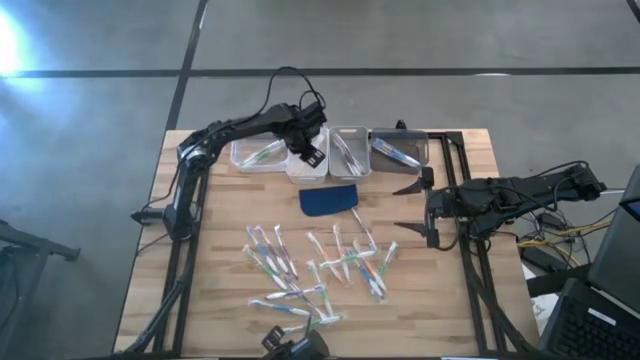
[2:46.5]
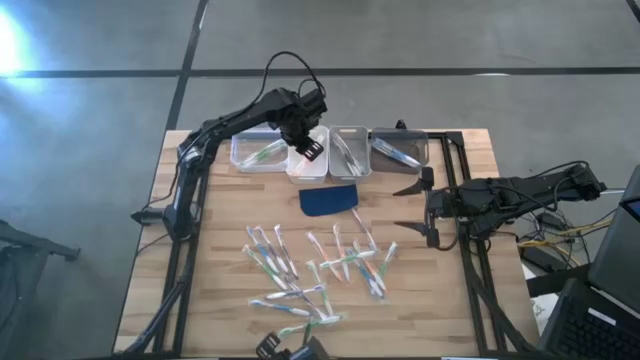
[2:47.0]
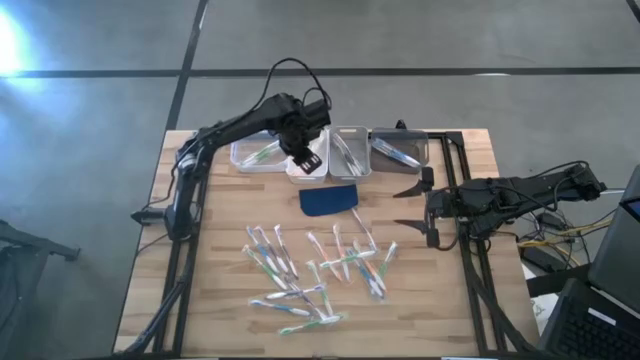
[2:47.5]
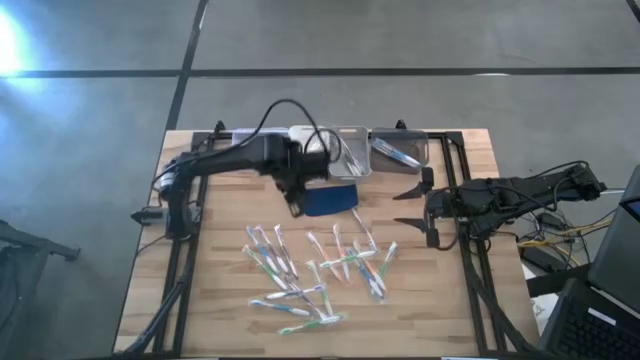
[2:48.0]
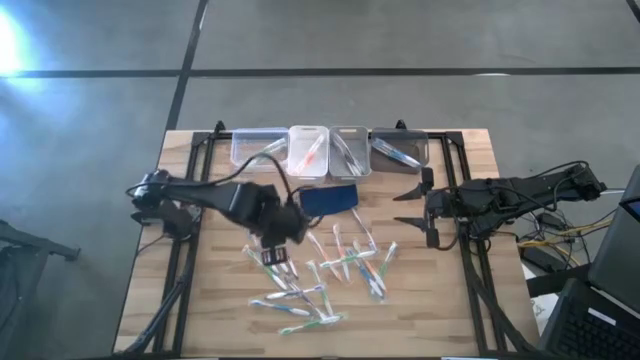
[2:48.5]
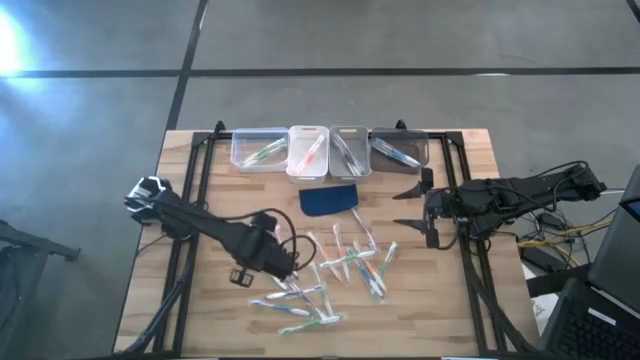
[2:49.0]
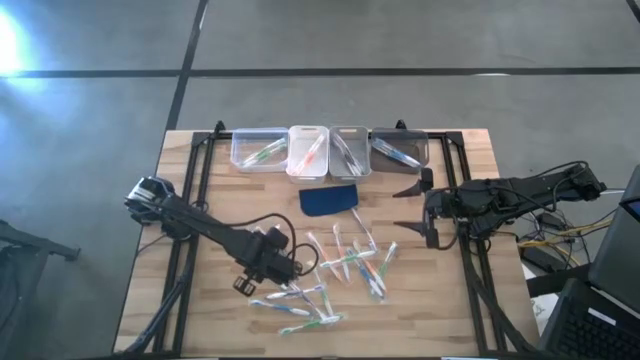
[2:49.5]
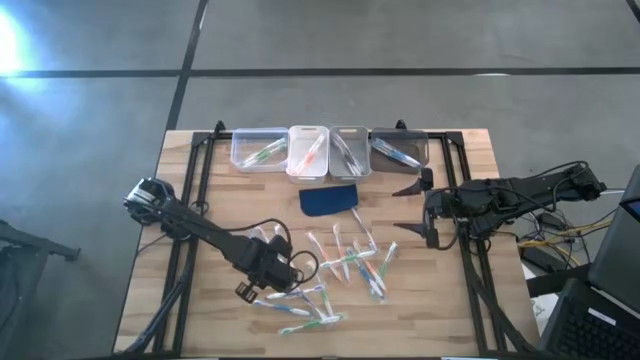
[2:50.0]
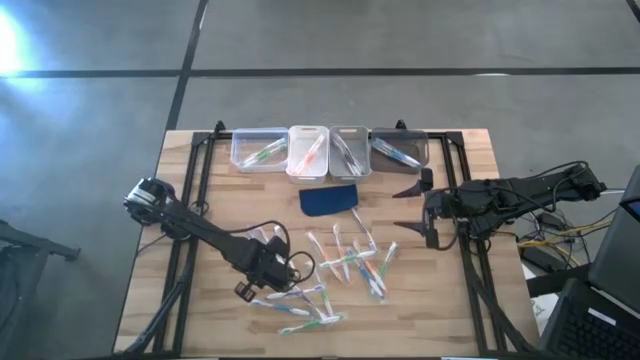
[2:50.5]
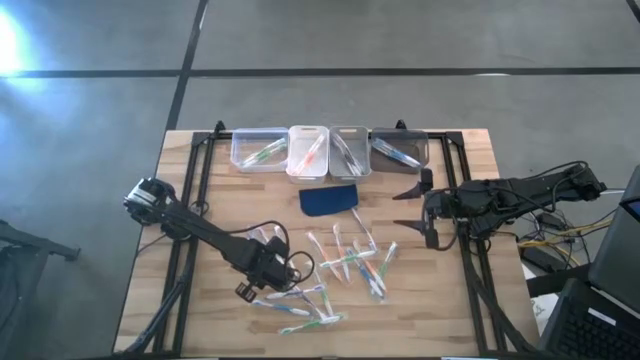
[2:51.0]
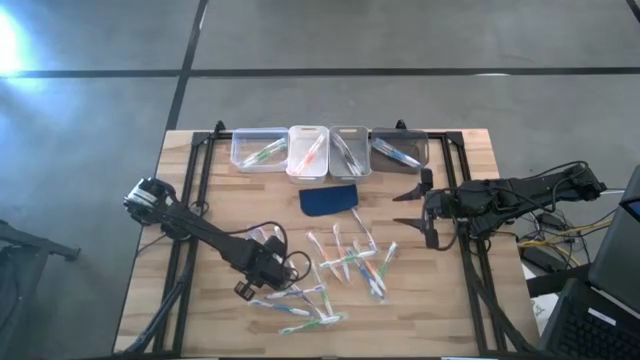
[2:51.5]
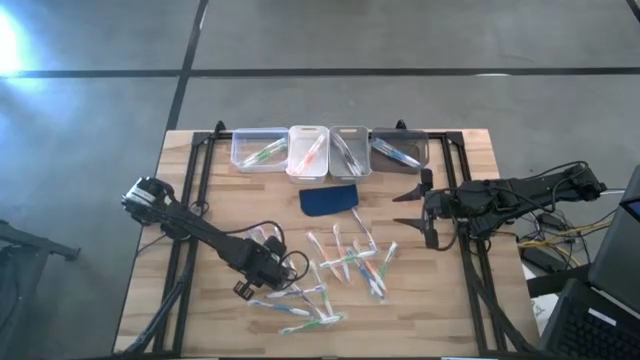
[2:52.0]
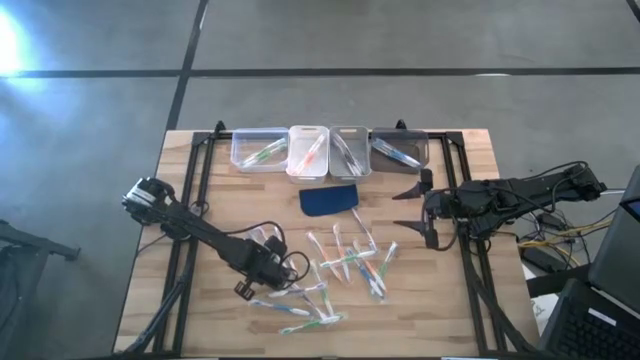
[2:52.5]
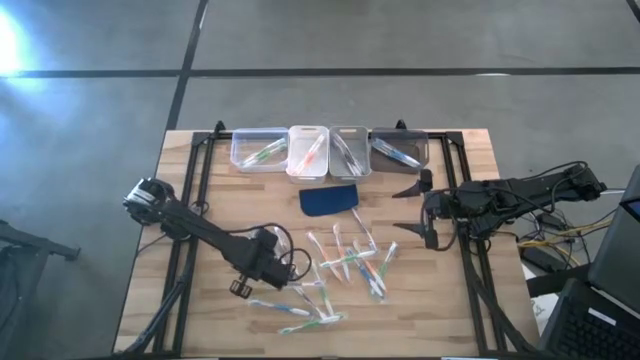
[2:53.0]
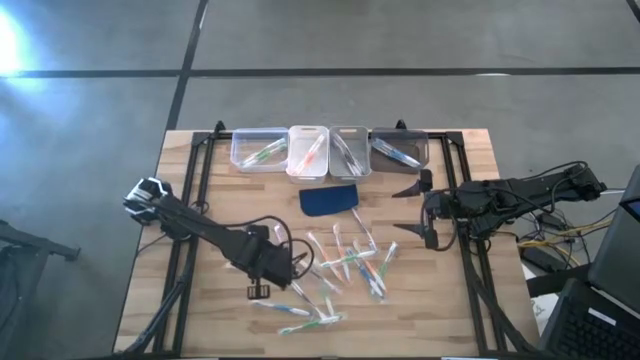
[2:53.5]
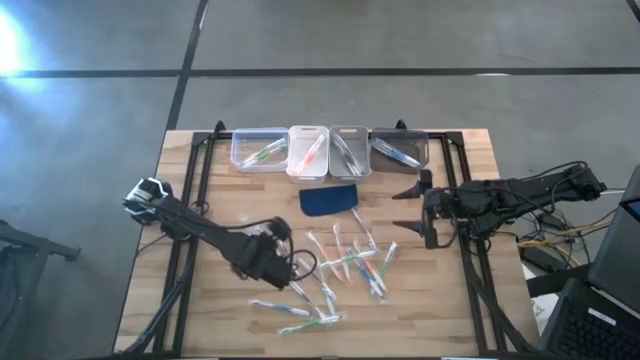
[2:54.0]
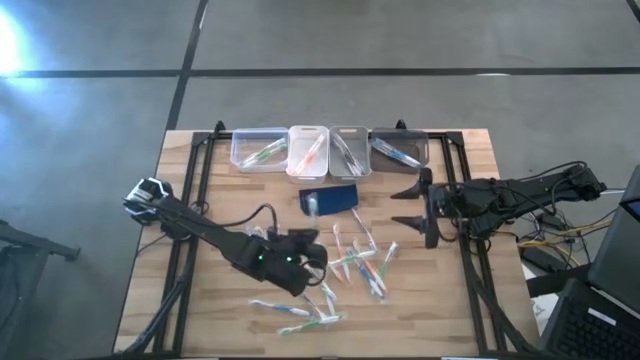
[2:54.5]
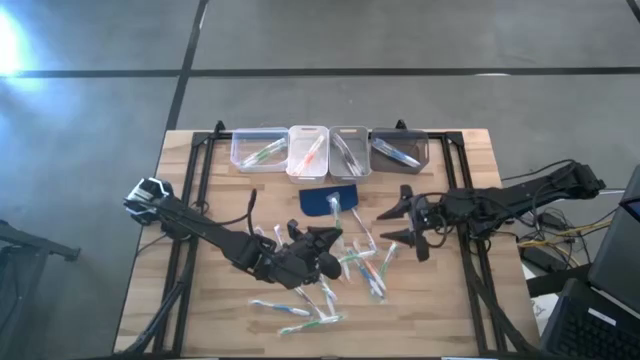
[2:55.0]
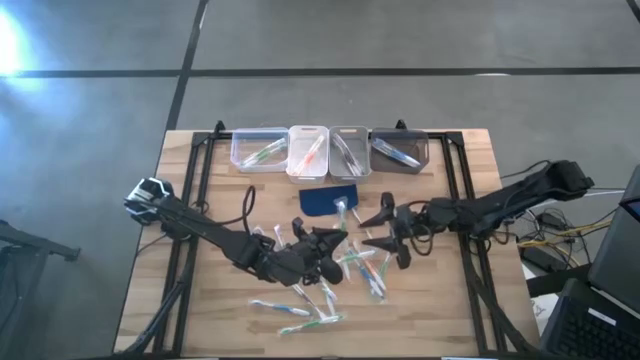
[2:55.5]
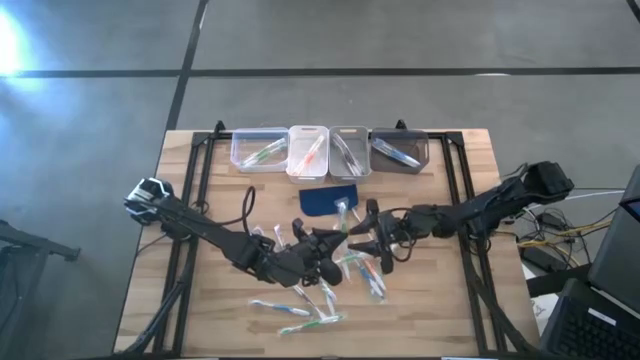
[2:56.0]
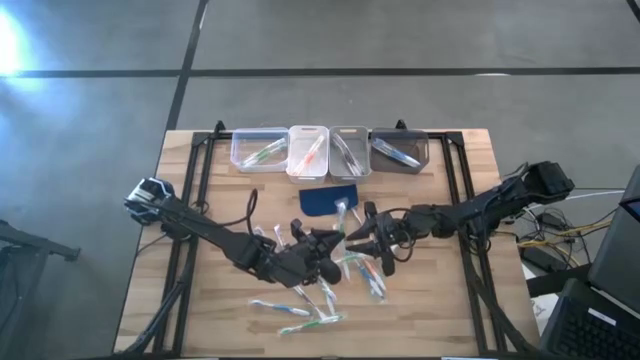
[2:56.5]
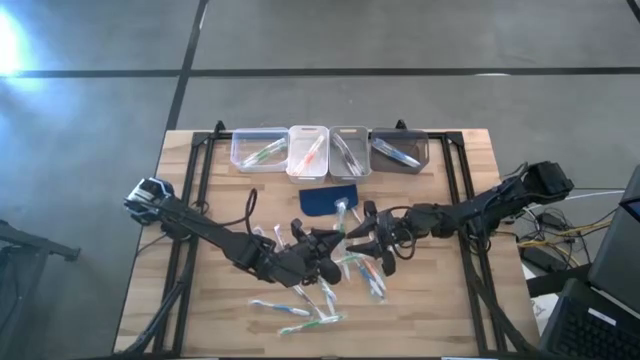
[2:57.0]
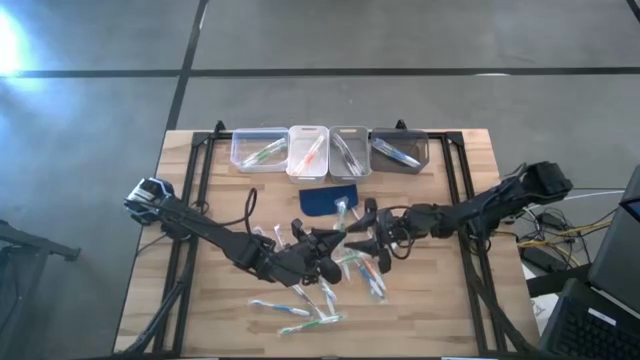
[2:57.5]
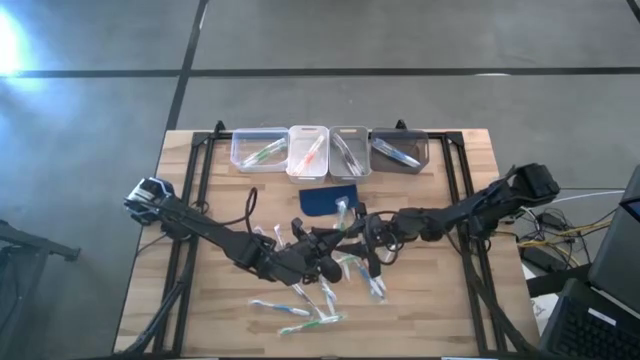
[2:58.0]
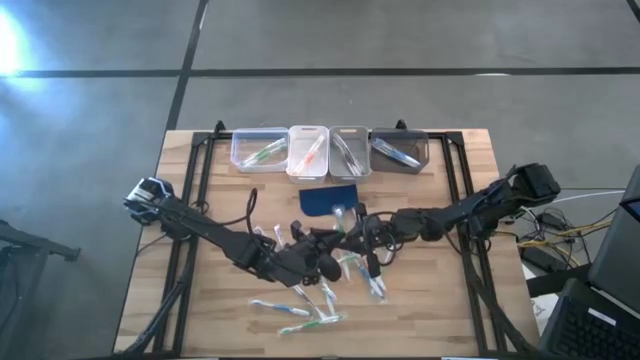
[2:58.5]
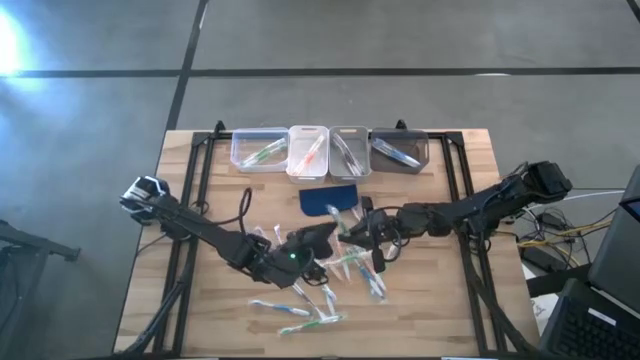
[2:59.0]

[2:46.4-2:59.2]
Task: Pick & Place Toothbrushes
Put the green toothbrush into the transparent bin

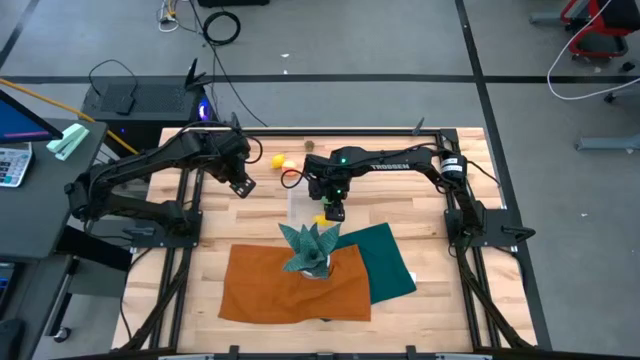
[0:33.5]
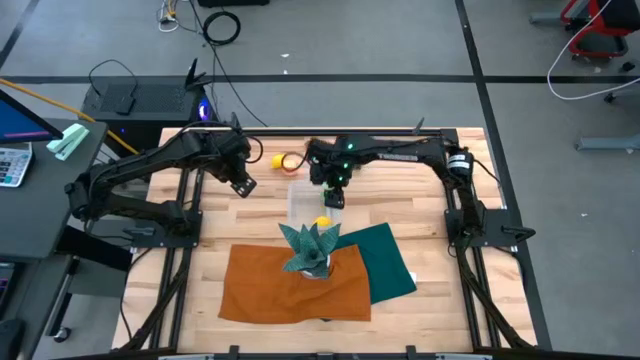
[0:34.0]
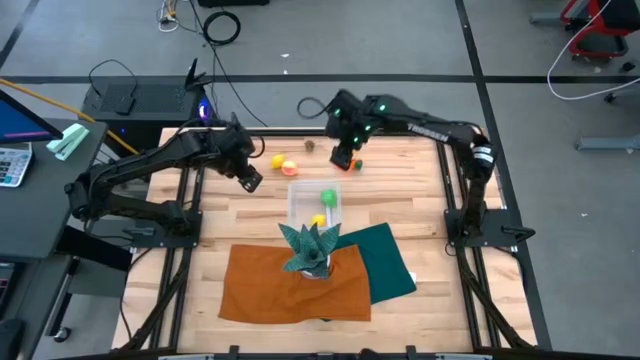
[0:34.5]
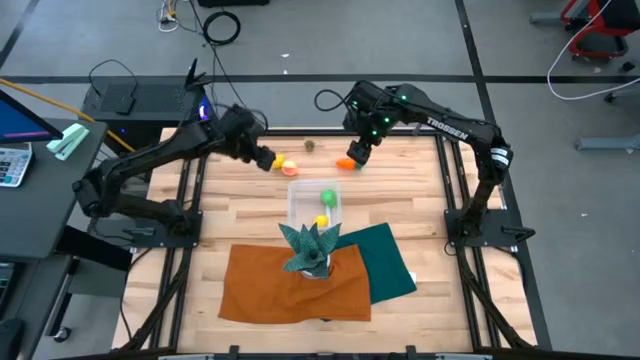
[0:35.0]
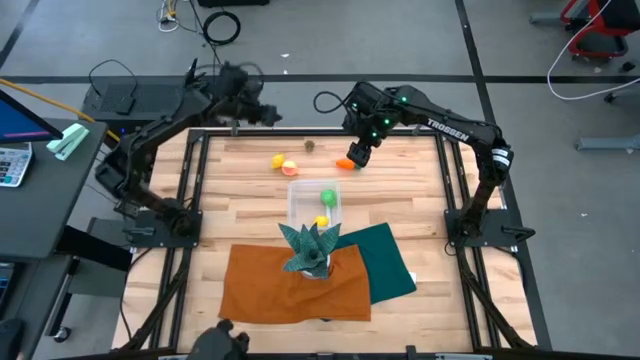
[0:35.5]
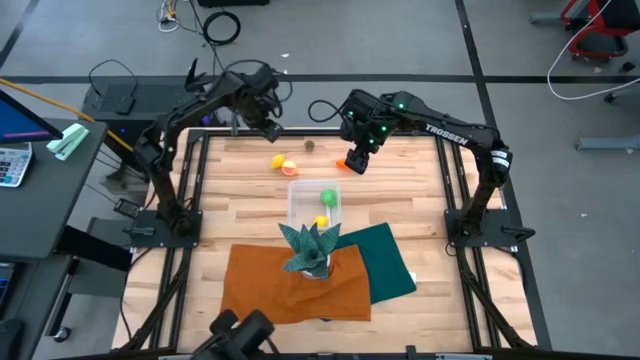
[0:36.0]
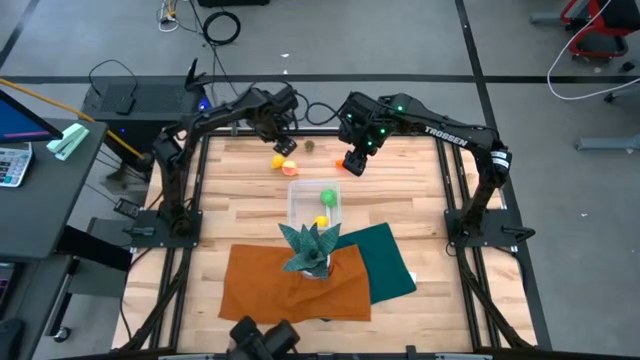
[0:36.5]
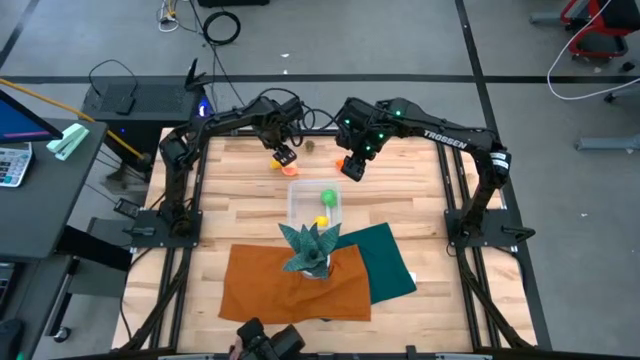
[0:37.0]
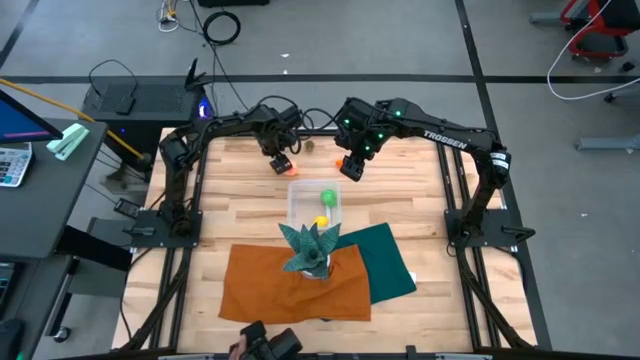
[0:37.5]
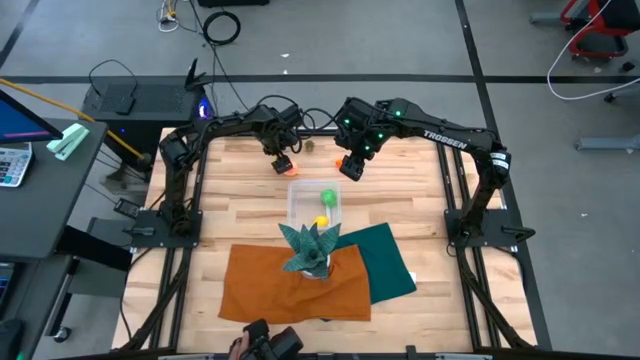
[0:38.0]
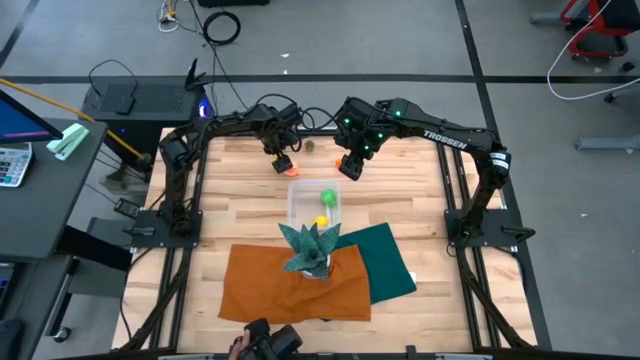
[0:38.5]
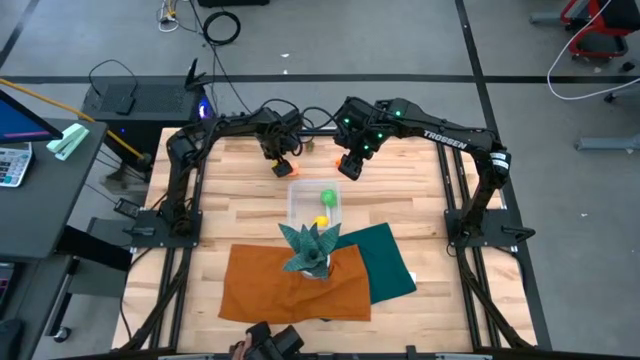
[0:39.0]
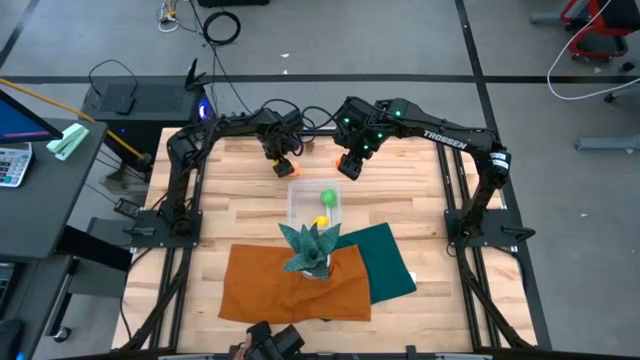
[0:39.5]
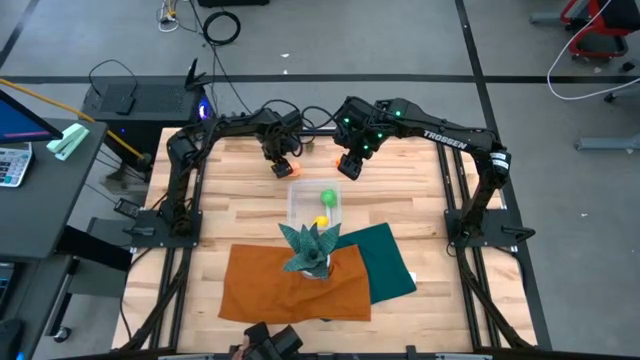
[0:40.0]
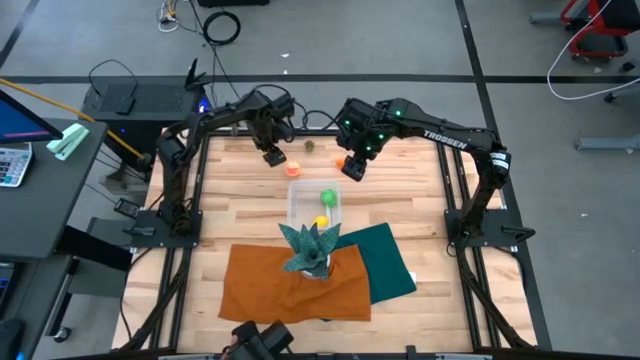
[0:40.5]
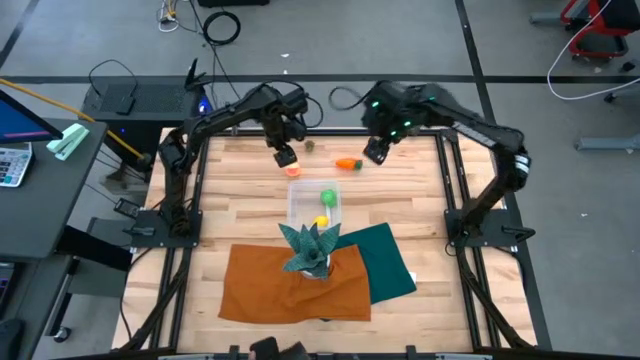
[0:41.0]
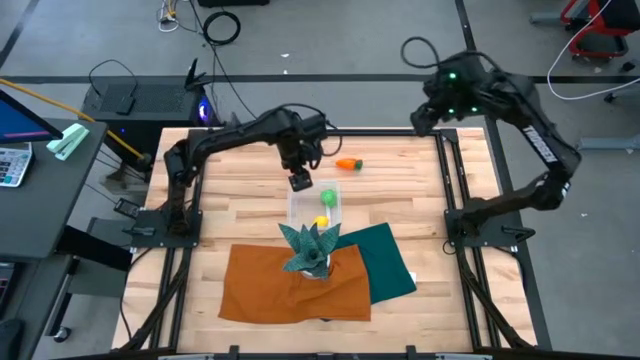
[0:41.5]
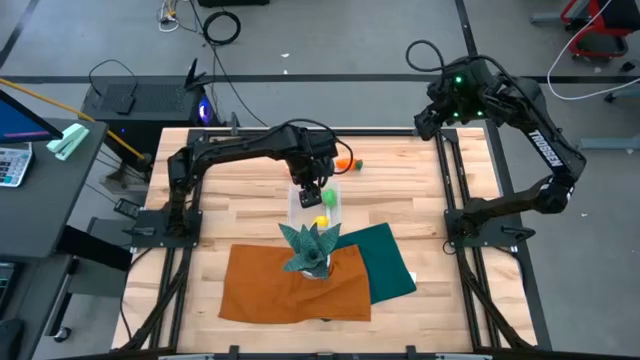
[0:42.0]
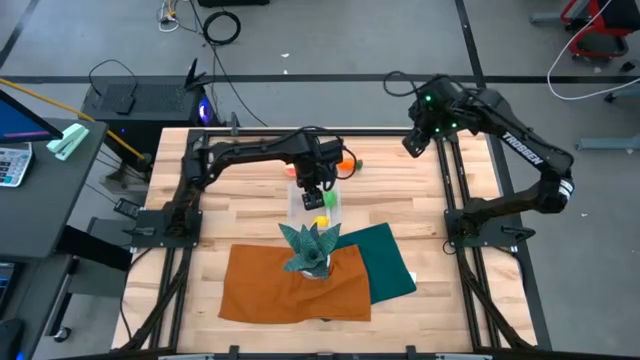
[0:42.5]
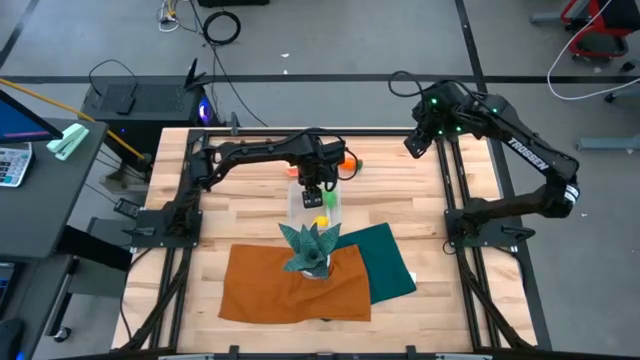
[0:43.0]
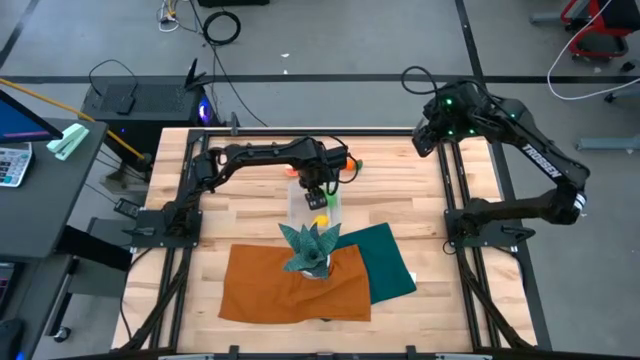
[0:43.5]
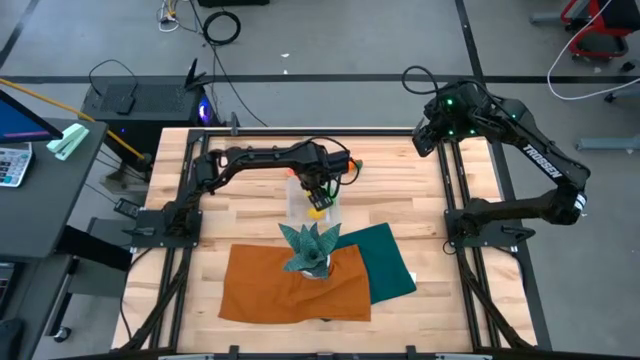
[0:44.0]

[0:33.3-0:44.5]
Task: Pick and placing Produce into tupperware
Put the yellow lemon into the transparent bin
